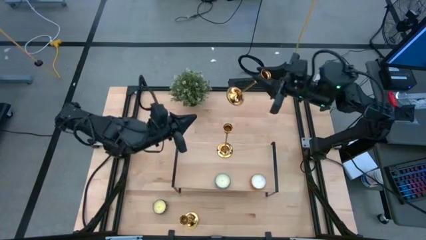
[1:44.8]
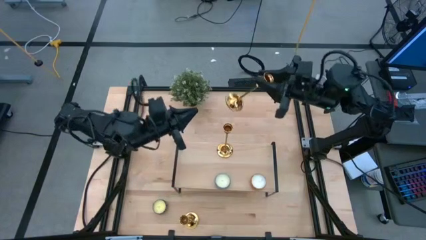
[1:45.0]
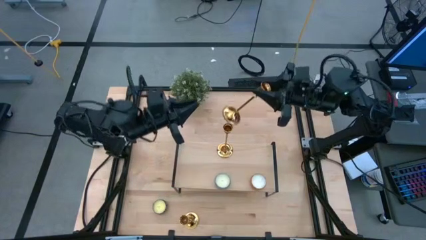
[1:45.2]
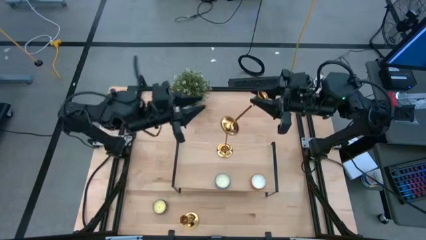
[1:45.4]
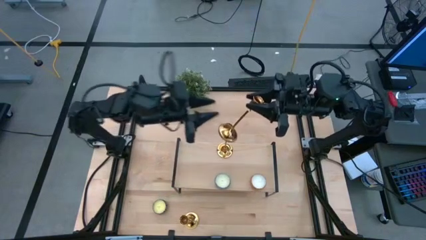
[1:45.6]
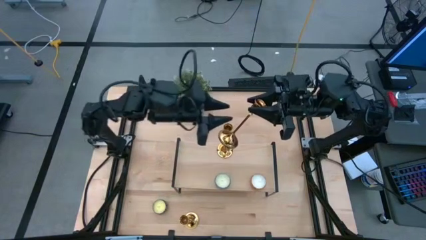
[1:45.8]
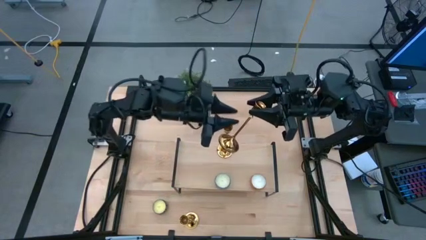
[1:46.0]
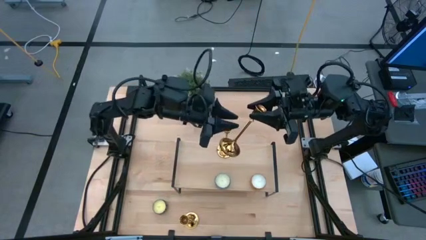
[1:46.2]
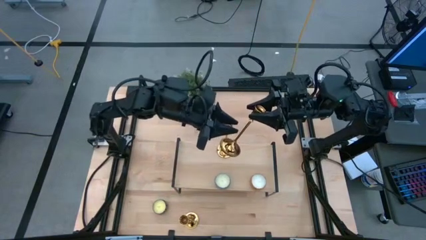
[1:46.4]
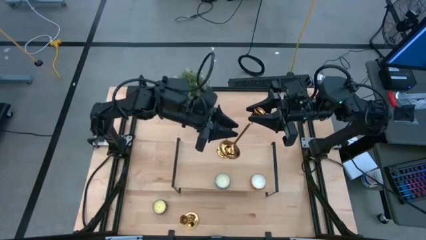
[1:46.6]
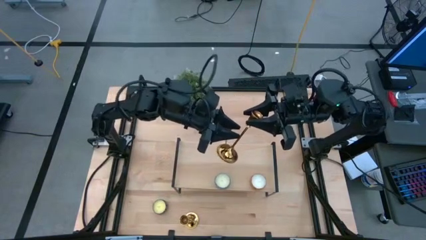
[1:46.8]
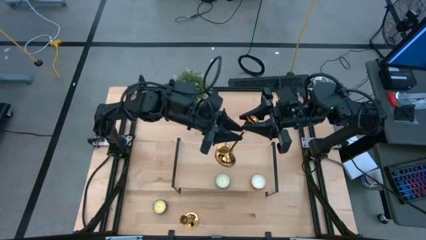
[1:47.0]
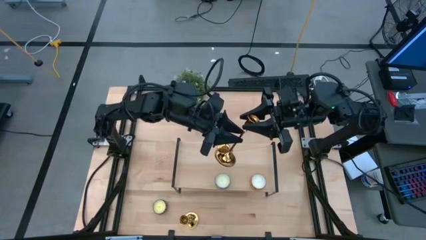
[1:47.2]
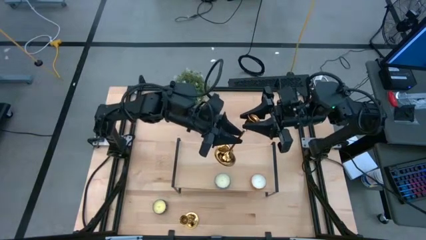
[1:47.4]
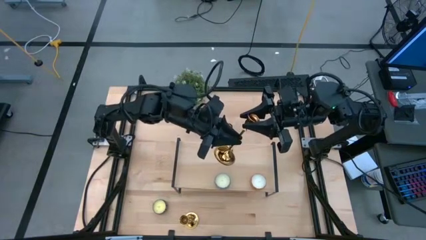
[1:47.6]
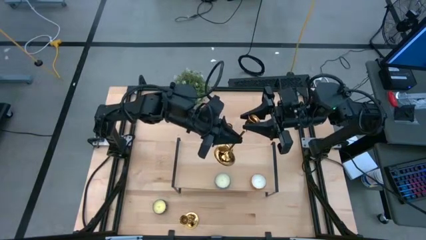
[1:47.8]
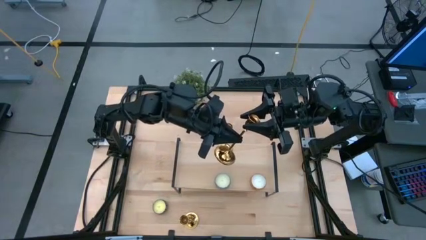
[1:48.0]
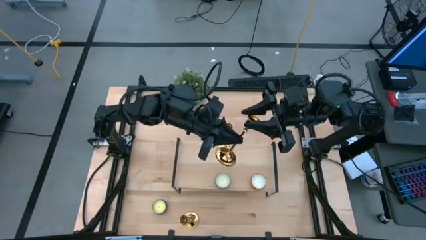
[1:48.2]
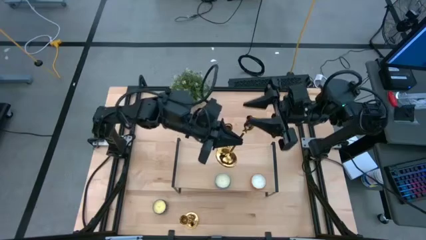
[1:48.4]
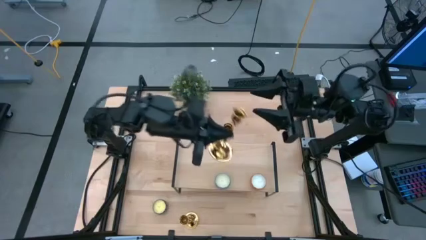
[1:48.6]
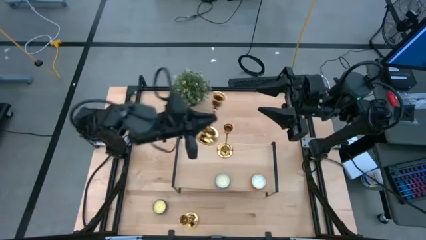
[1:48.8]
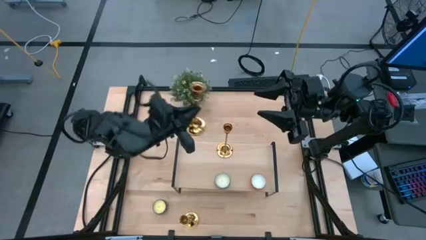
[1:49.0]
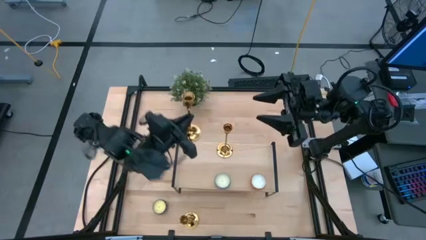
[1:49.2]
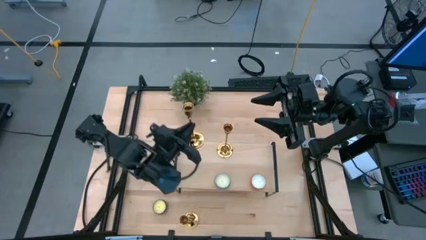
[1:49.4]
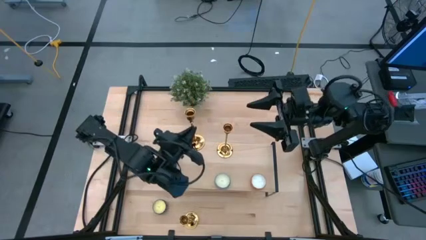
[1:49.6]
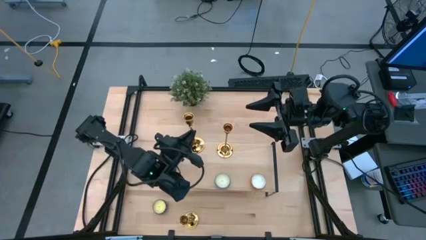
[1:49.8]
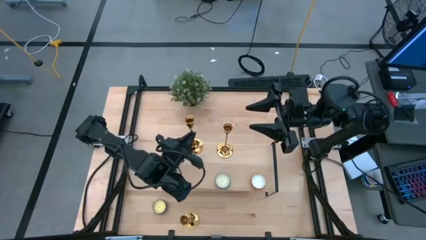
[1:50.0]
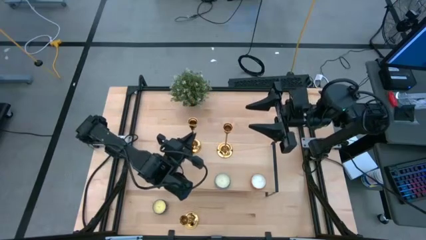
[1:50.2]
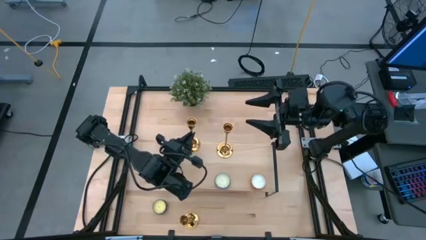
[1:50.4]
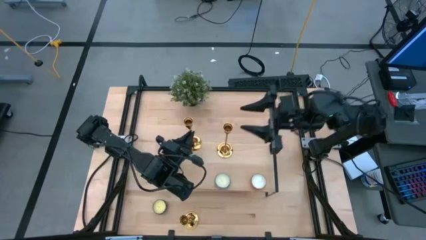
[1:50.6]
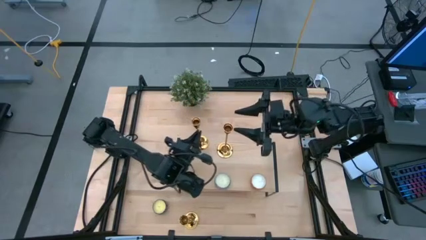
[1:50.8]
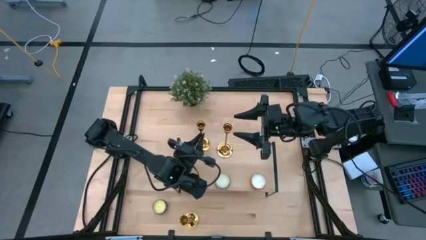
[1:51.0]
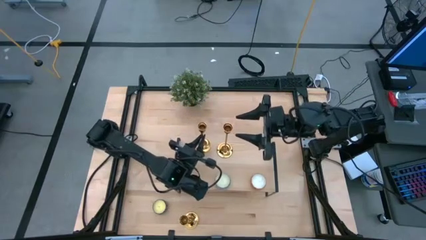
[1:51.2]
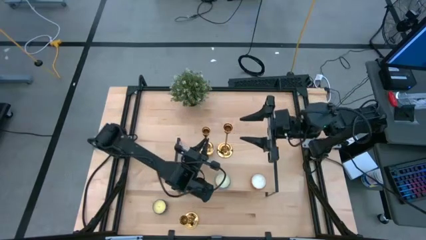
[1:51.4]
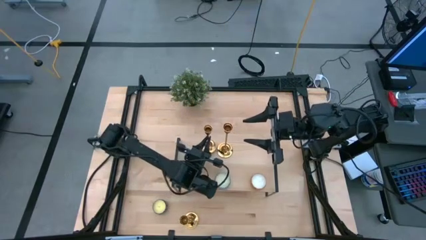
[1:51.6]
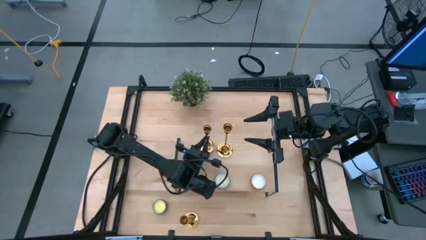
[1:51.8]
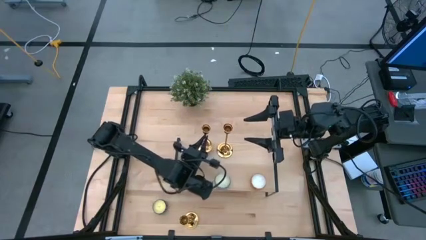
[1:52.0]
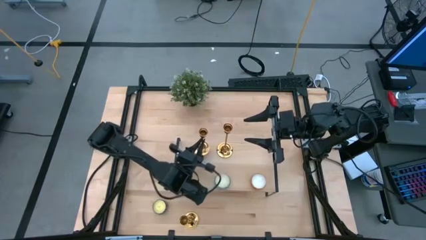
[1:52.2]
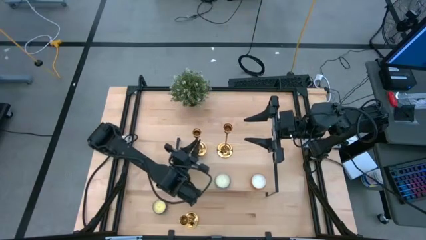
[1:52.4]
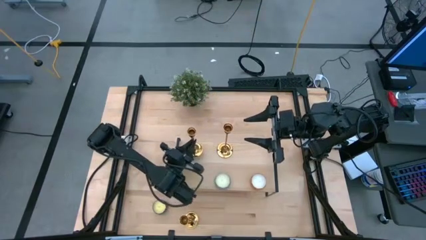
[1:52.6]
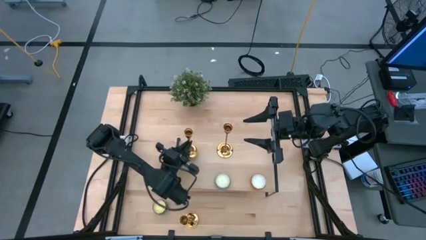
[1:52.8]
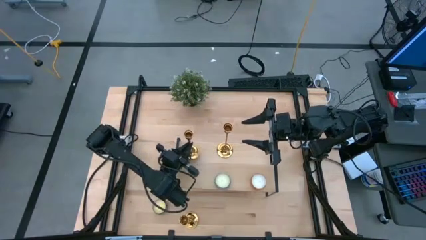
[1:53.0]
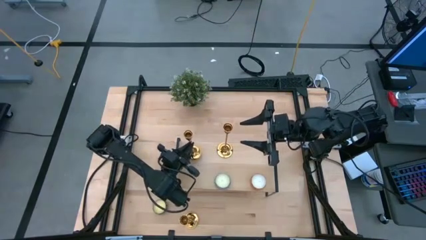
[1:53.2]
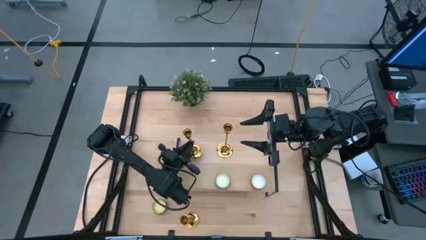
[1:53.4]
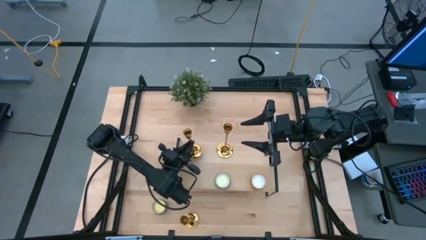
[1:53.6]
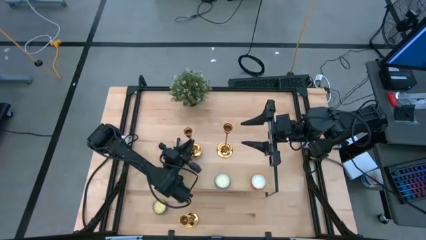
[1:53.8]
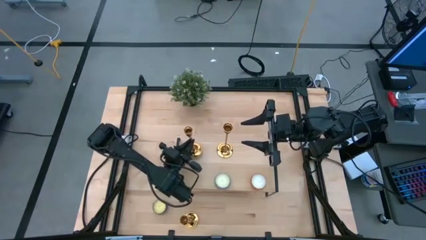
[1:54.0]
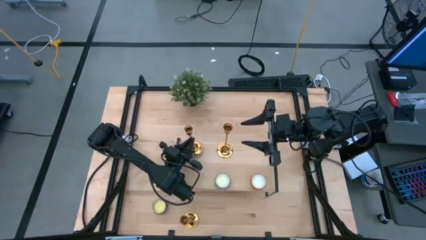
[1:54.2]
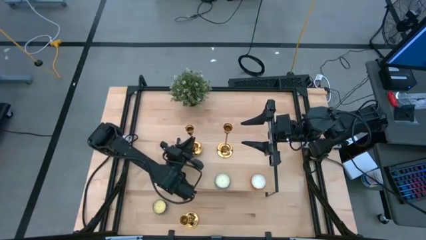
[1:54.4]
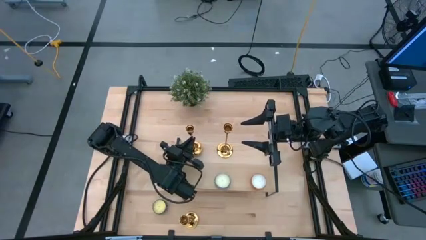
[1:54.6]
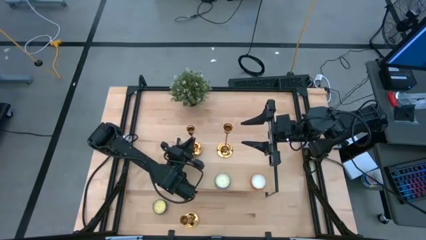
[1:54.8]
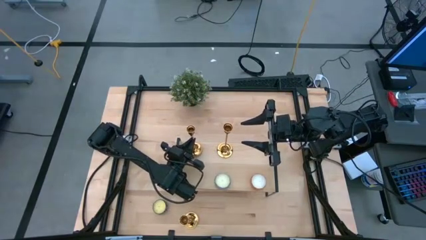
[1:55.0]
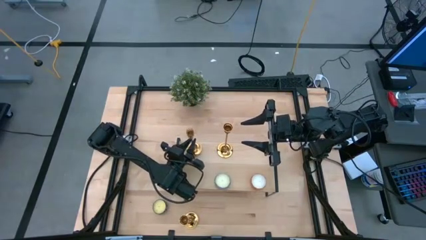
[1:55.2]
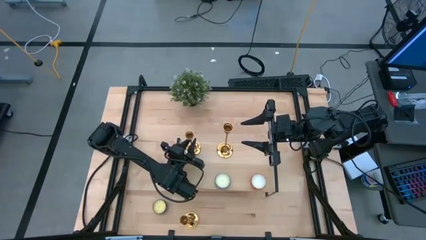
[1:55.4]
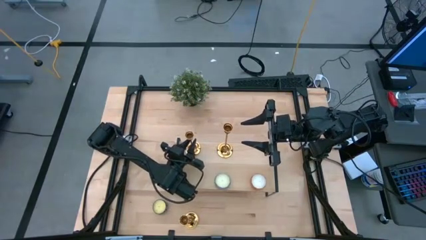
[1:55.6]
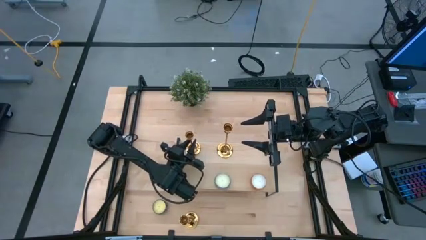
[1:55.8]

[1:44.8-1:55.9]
Task: Pick & Place candle stick holders
Put the top candle holder on the shelf aligned with the other candle holder

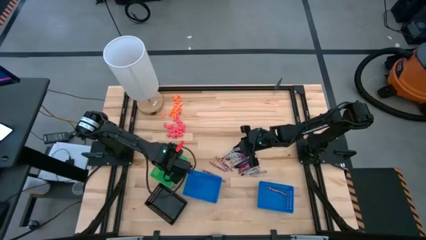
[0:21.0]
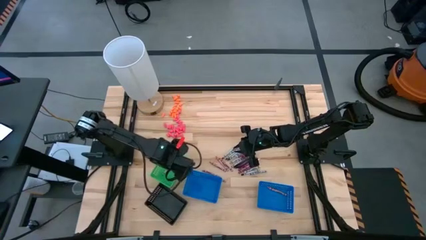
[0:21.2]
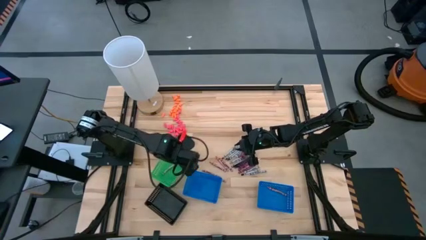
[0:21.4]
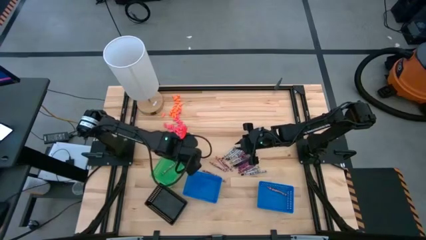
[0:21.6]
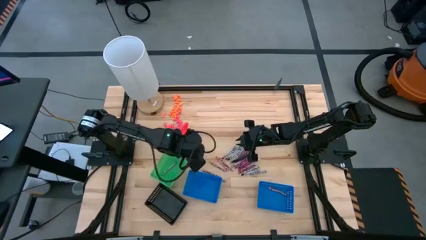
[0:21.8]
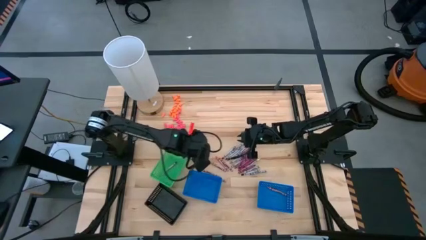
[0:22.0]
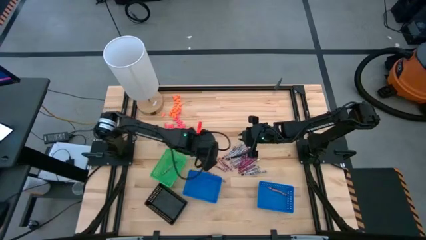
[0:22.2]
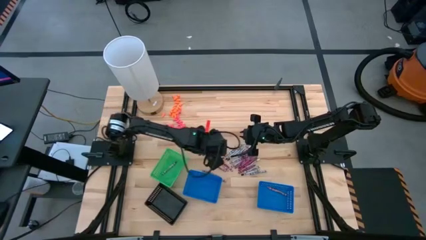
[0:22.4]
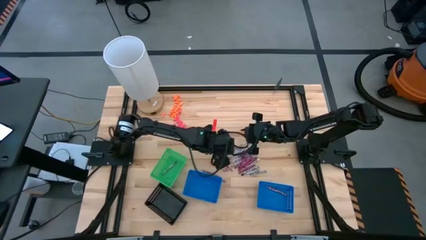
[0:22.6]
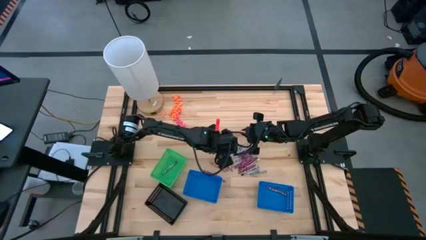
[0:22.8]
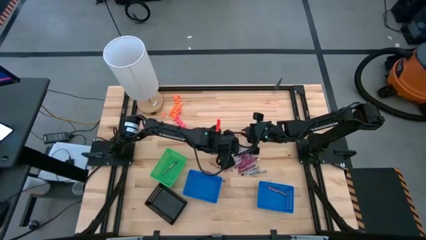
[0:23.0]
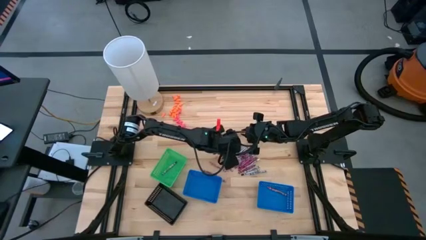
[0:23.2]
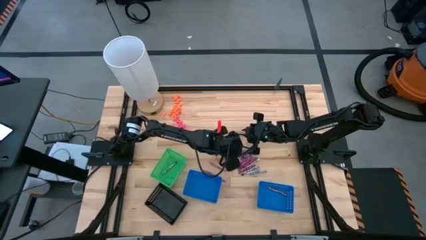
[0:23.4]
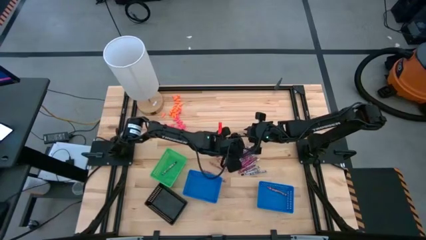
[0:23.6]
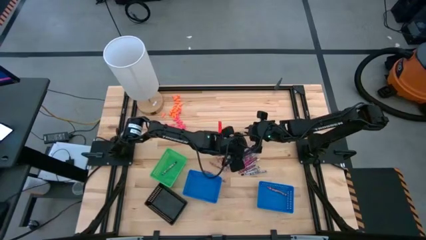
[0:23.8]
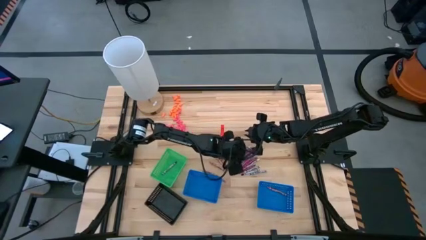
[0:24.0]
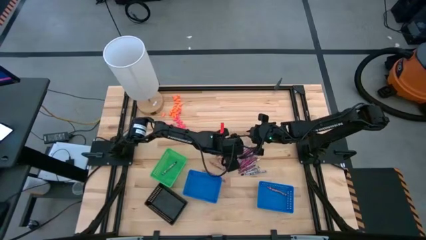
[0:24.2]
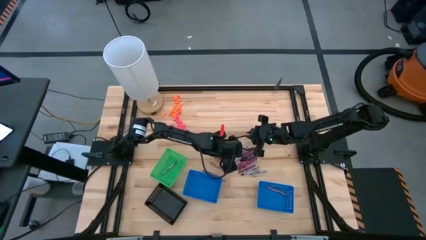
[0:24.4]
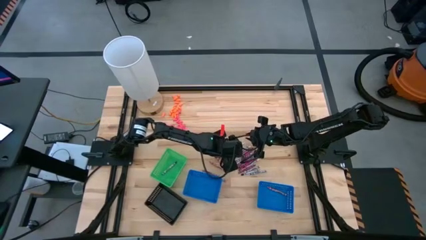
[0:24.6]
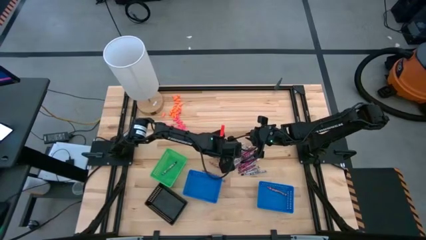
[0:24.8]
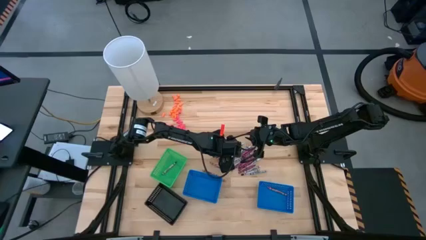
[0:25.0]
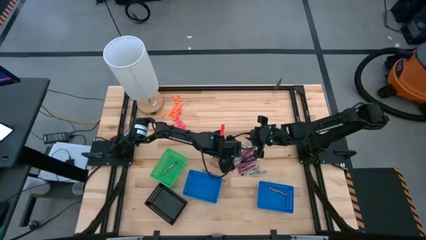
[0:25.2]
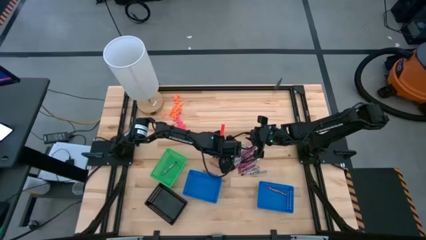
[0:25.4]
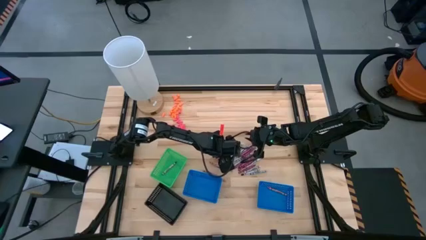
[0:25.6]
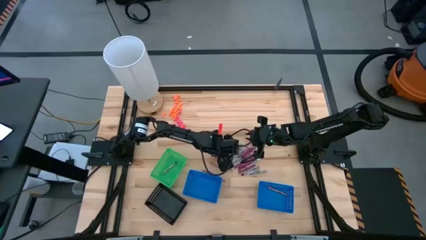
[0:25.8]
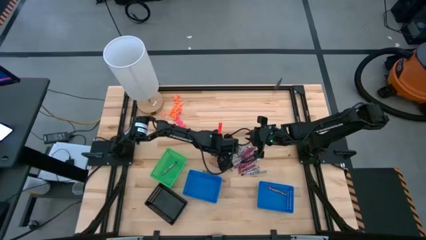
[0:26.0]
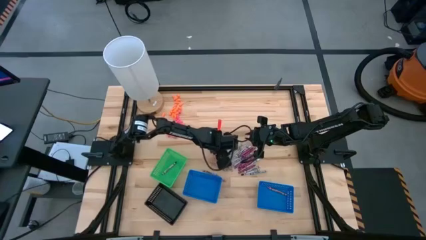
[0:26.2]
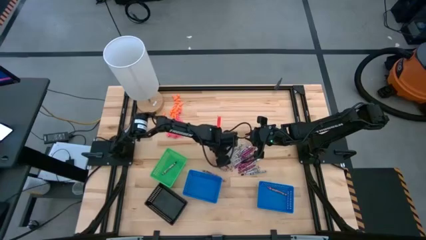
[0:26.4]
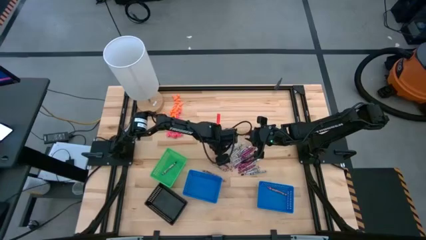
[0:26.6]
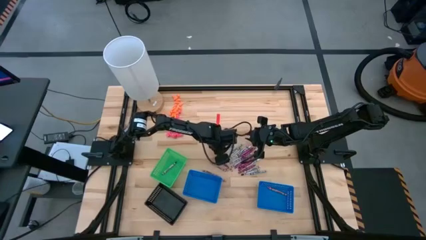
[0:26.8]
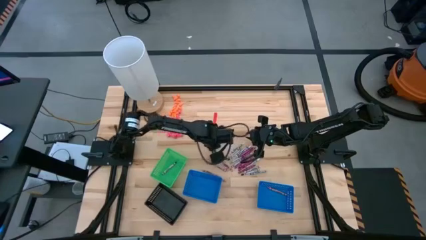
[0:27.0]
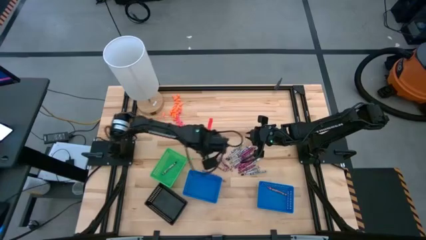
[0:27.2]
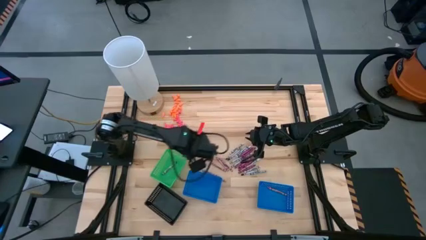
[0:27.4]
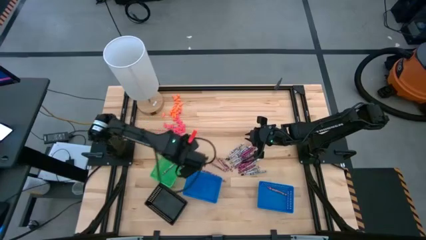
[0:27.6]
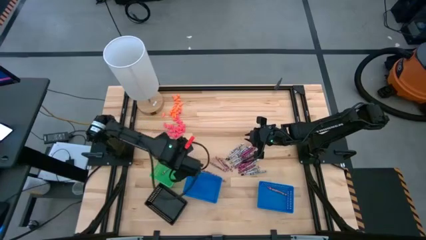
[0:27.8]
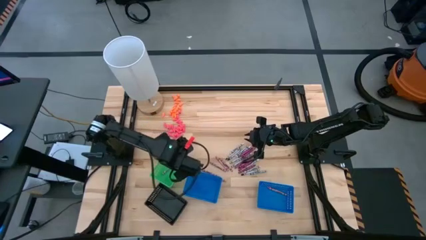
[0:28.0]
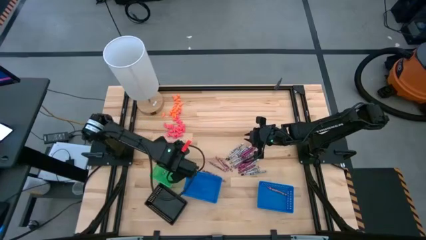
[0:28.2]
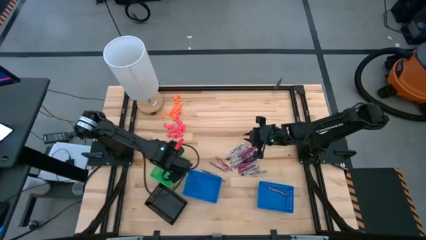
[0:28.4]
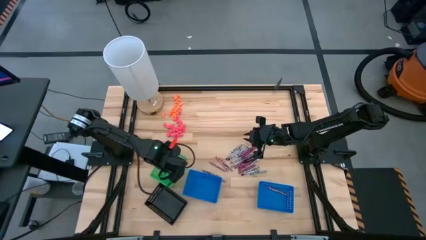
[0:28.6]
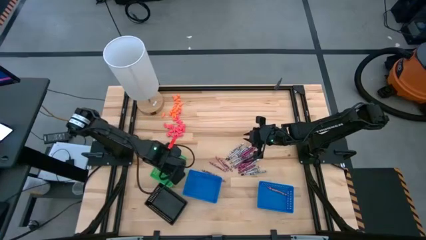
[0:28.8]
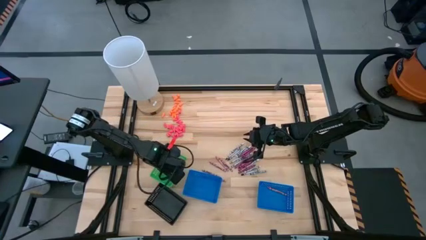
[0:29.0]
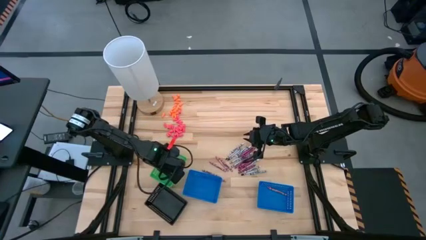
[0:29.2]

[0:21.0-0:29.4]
Task: Sort crayons
Put the black crayon into the green basket
